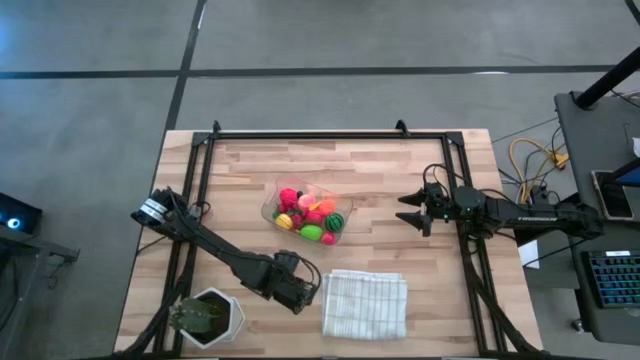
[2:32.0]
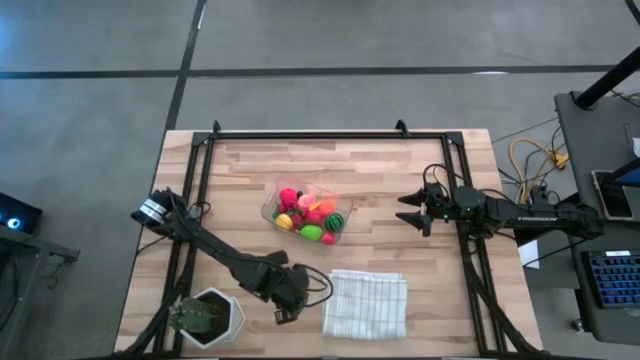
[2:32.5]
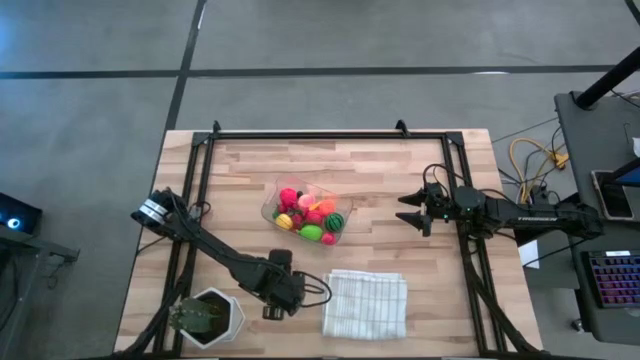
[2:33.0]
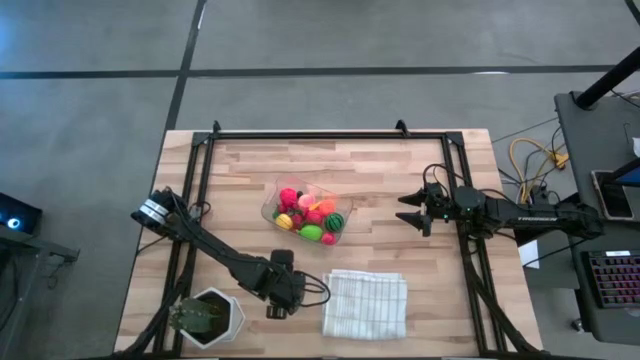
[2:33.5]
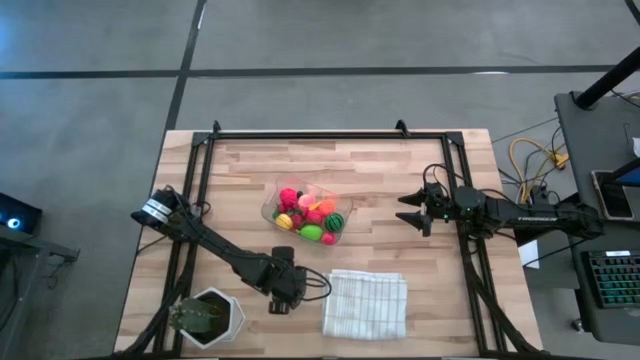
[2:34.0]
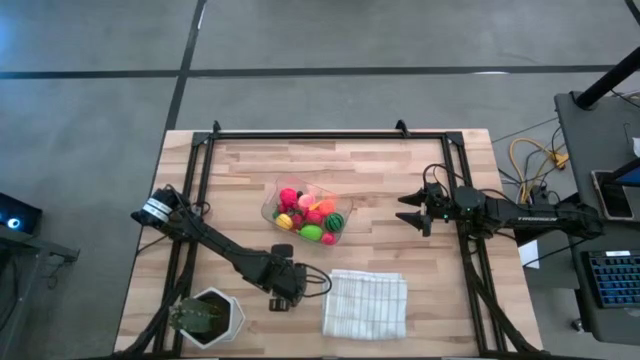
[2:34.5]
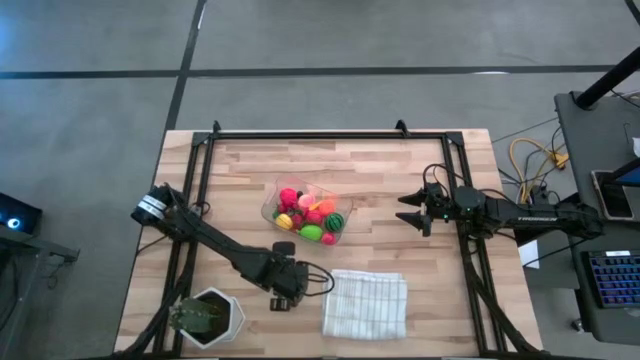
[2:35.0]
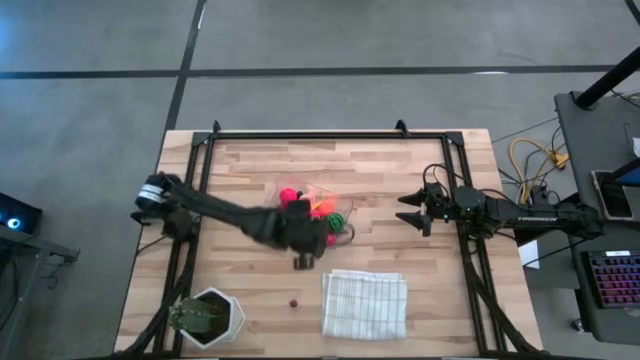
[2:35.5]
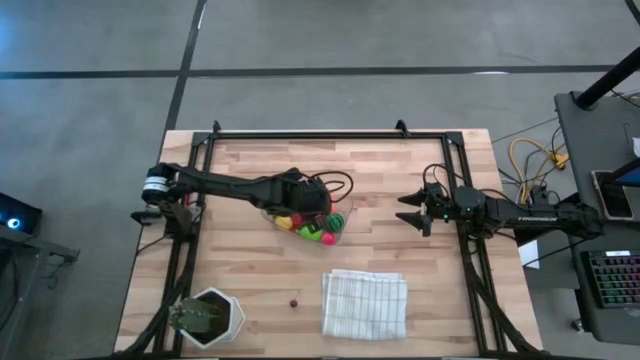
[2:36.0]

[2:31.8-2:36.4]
Task: Pick and placing Produce into tupperware
Put the red strawberry into the transparent bin

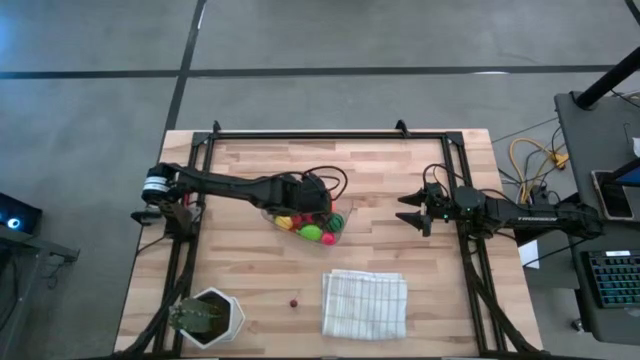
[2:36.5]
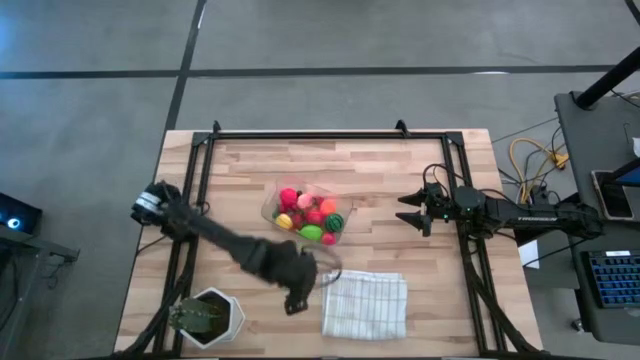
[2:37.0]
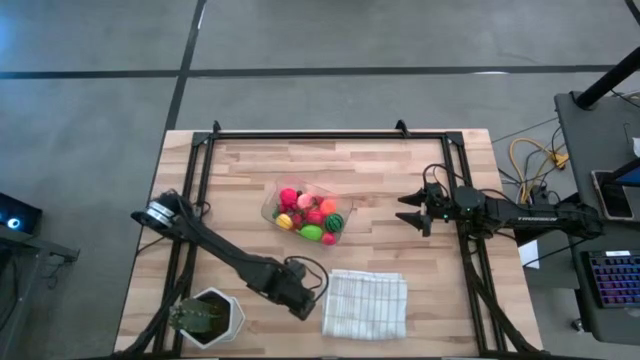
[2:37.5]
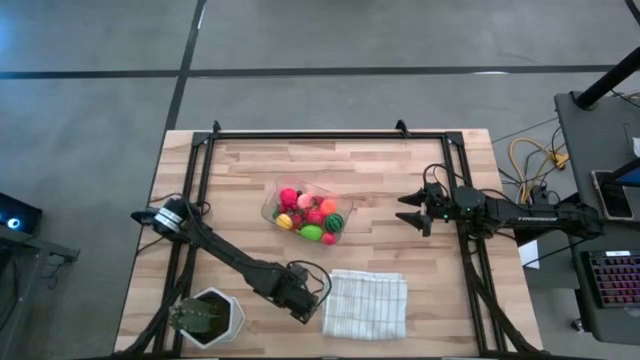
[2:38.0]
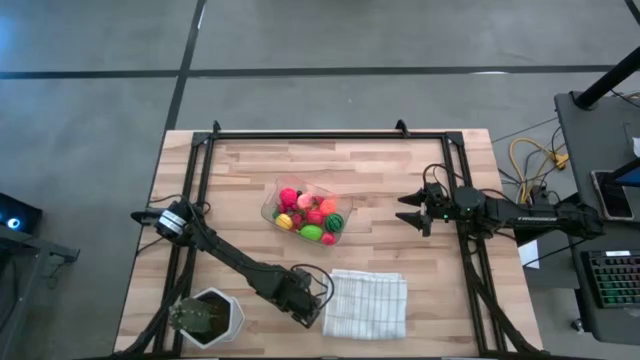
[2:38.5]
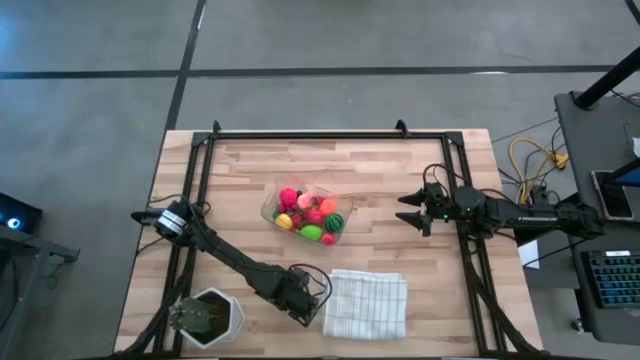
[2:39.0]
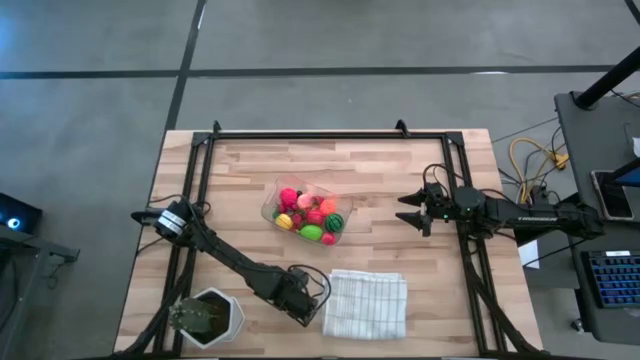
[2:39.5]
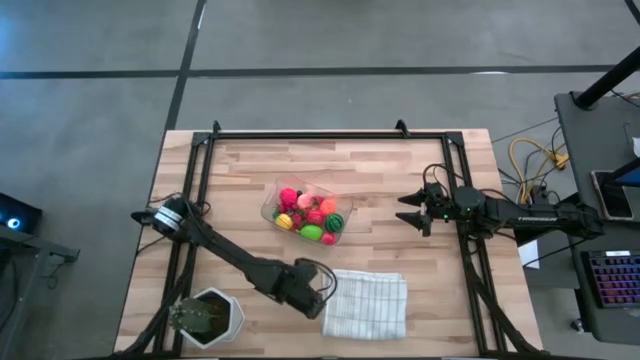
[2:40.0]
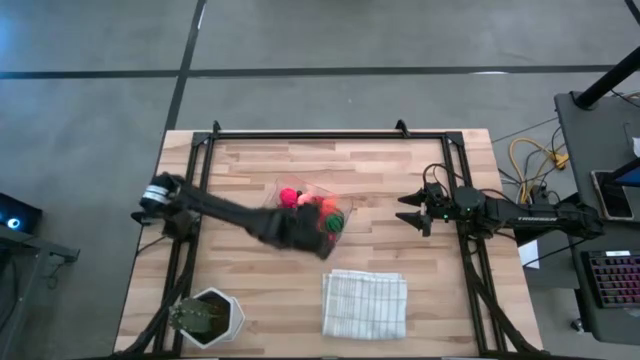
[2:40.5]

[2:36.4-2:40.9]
Put the red cherry into the transparent bin

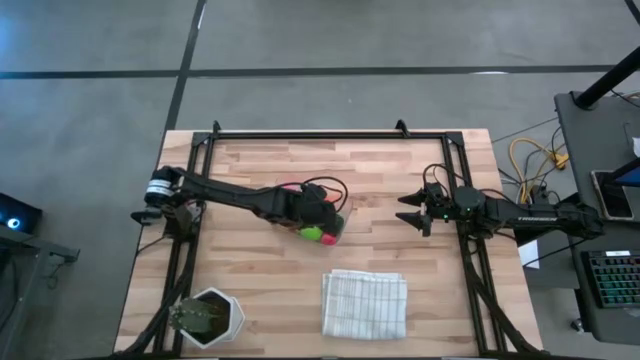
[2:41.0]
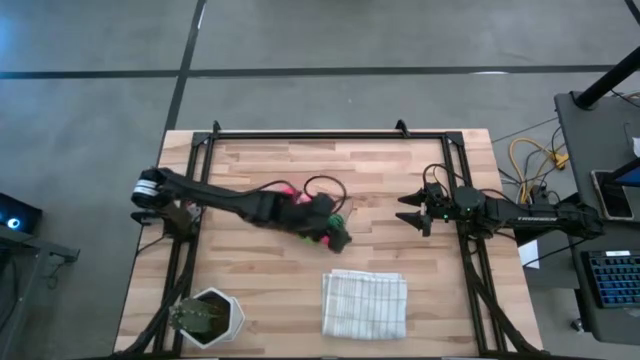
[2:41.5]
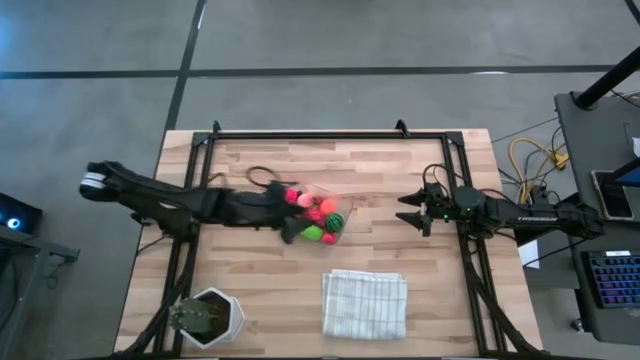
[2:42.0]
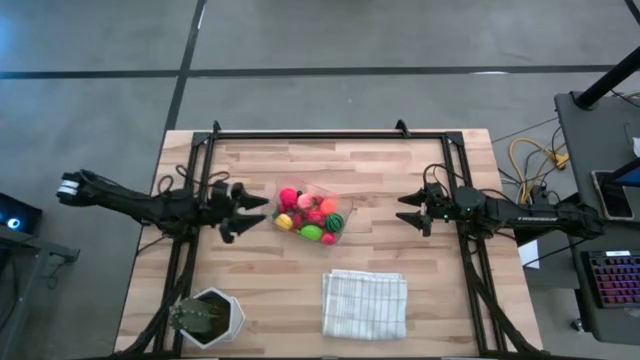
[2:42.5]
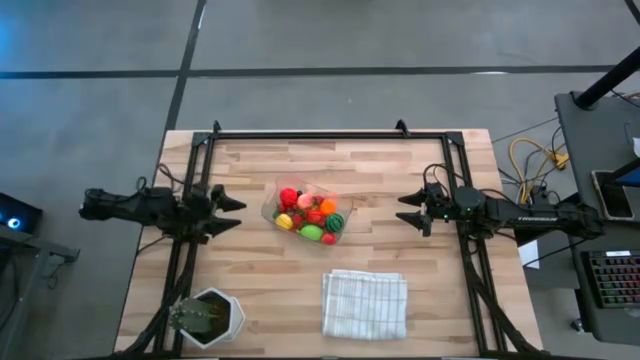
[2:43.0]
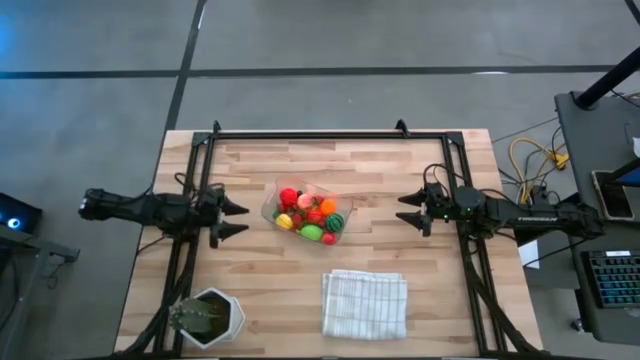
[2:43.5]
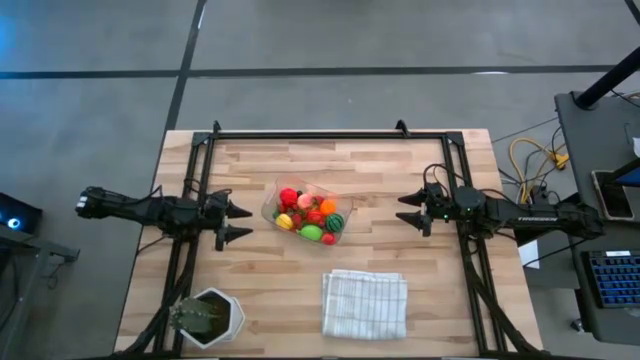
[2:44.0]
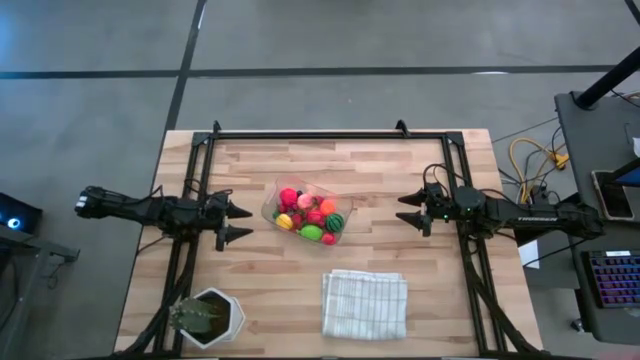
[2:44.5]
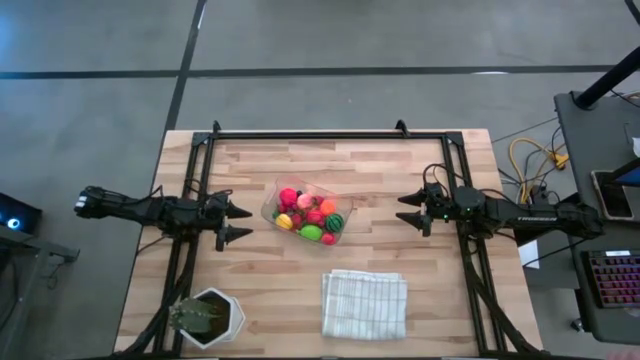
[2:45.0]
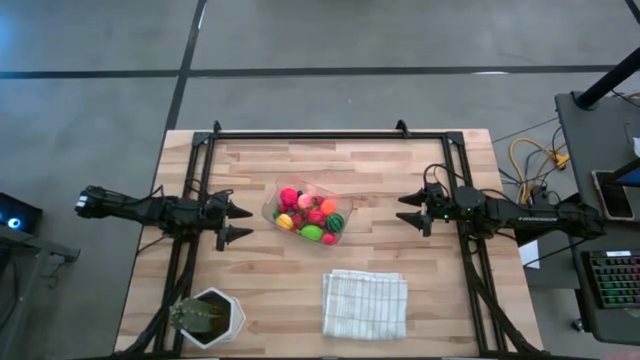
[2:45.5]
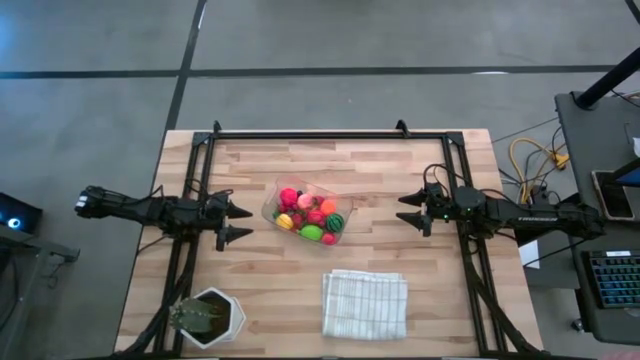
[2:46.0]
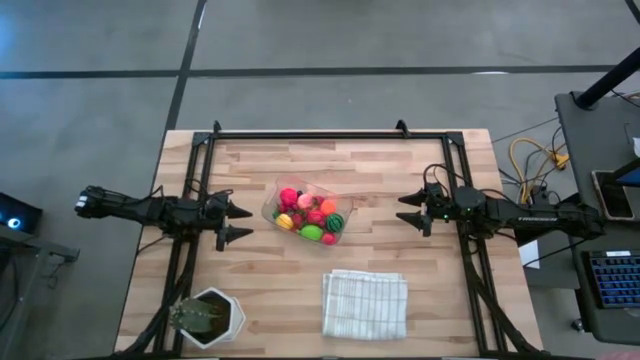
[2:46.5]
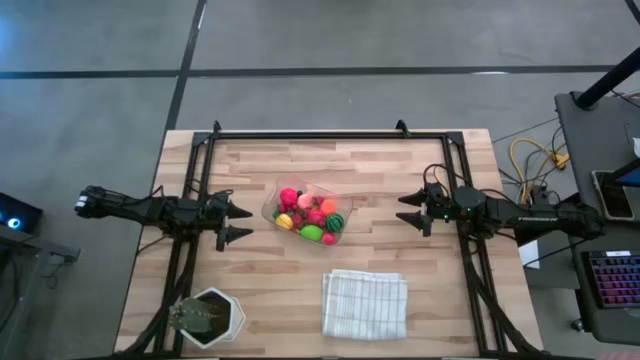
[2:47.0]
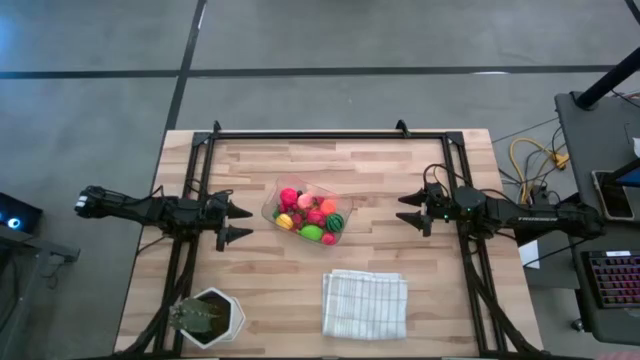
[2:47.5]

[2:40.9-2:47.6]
Return to Home Position

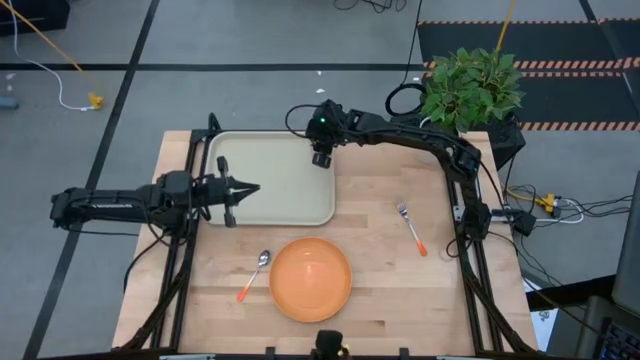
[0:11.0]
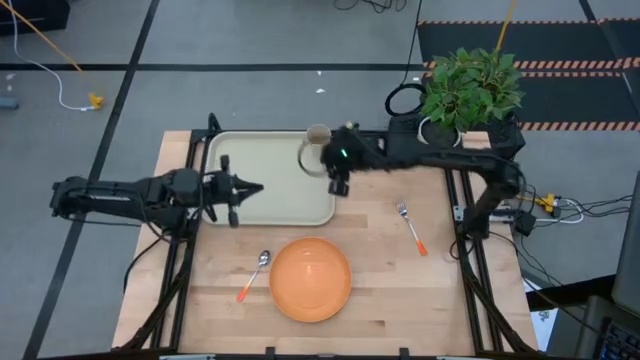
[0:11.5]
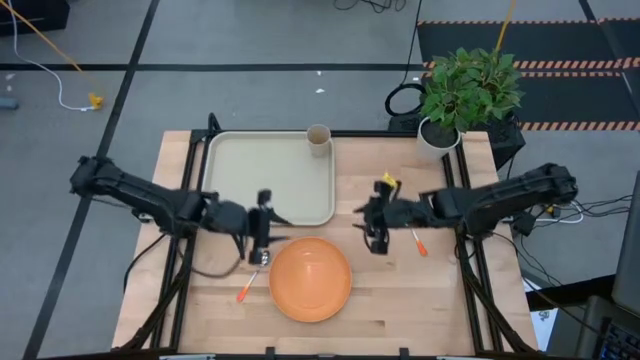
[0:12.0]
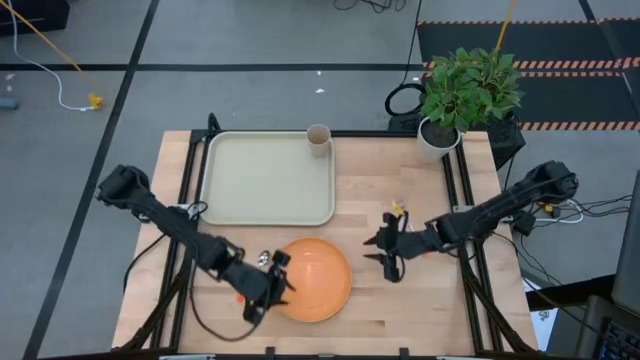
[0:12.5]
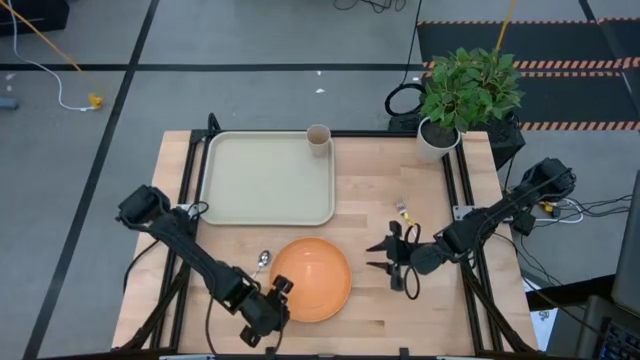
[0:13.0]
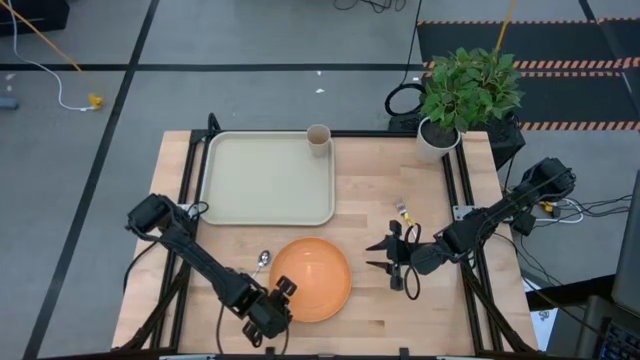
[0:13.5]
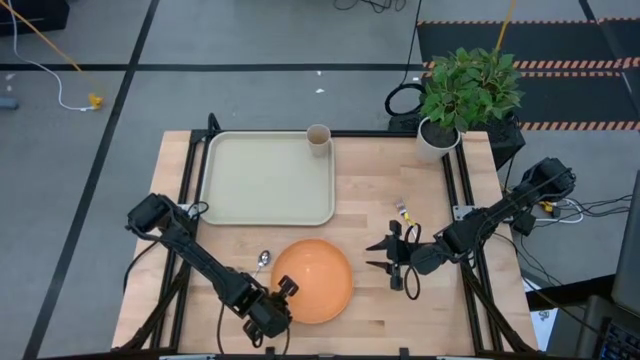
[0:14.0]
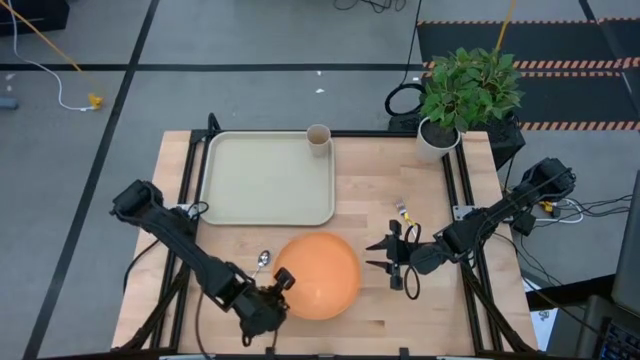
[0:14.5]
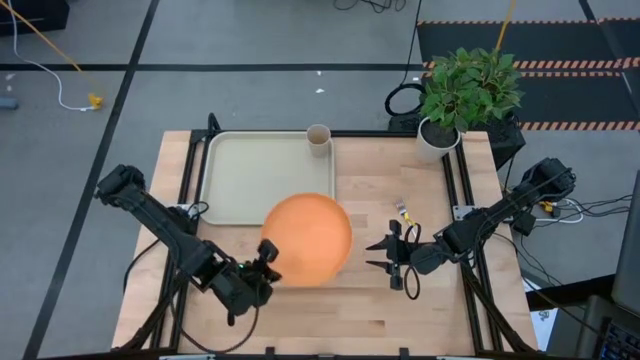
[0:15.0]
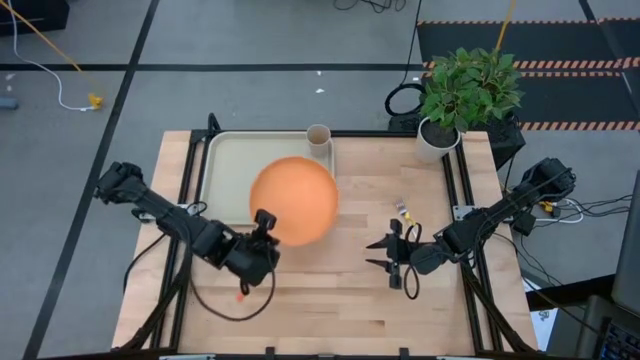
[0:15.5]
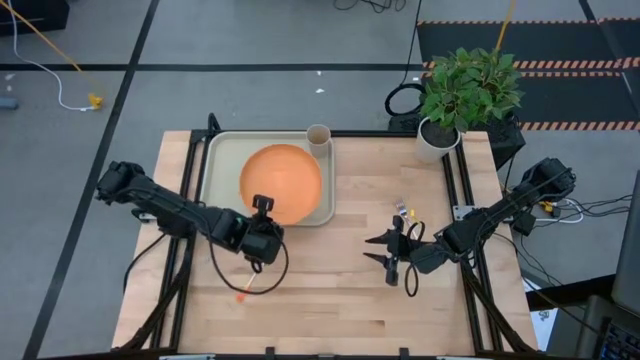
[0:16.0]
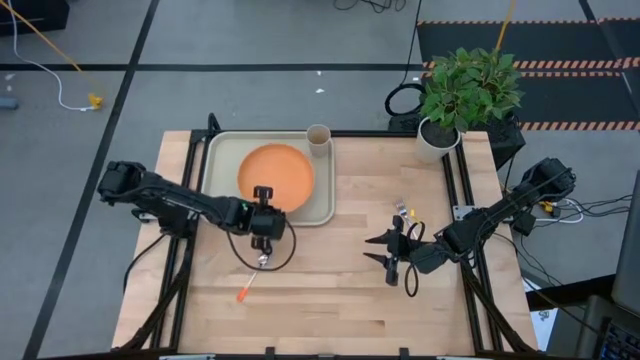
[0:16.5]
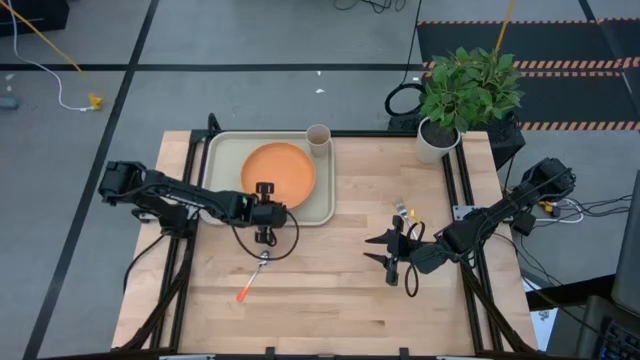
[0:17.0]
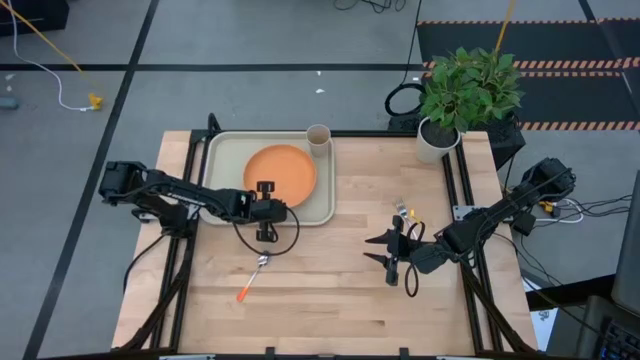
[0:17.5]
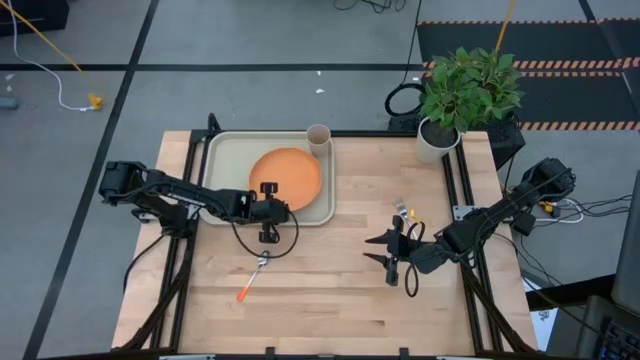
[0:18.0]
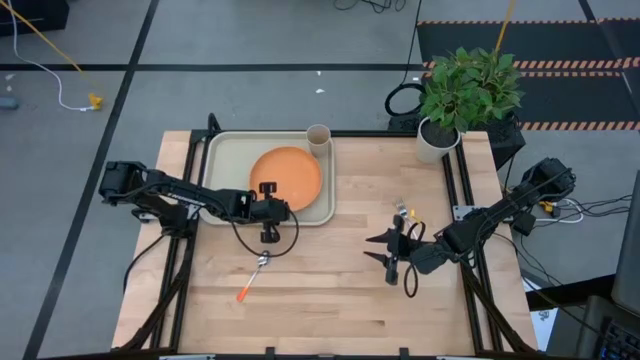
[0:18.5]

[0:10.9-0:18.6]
Task: Pick and place plate/cup/fork/spoon on tray
Put the orange plate on the white serving tray
